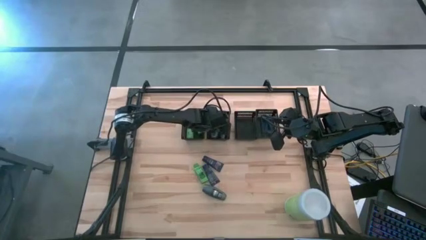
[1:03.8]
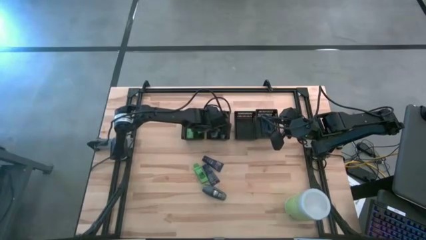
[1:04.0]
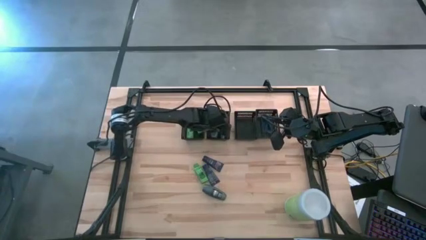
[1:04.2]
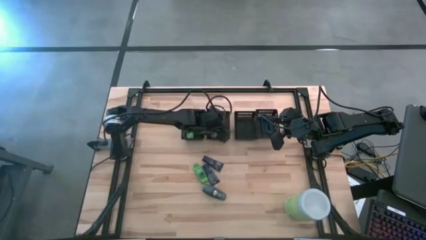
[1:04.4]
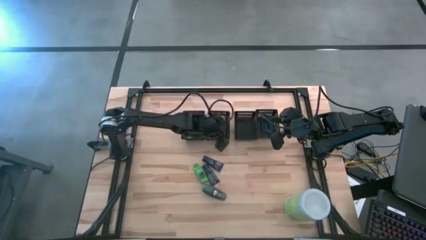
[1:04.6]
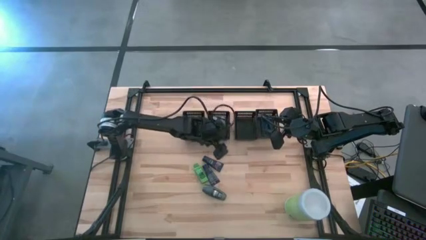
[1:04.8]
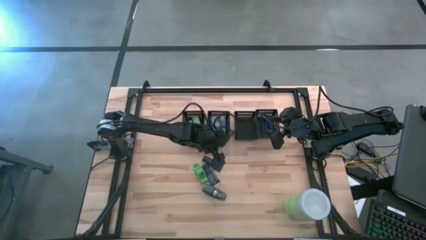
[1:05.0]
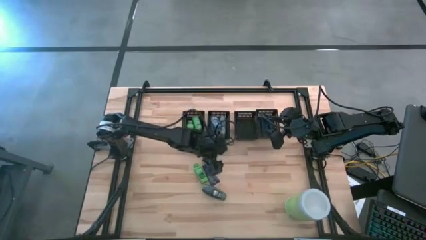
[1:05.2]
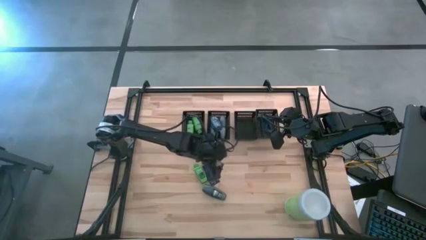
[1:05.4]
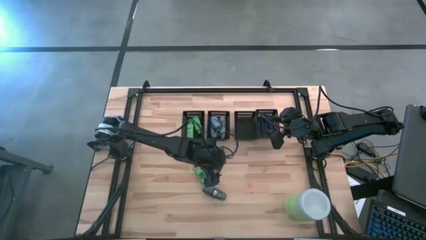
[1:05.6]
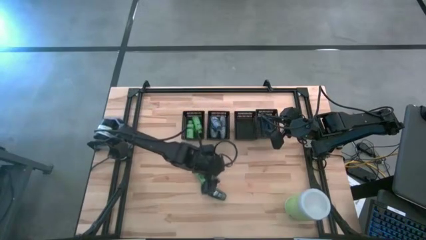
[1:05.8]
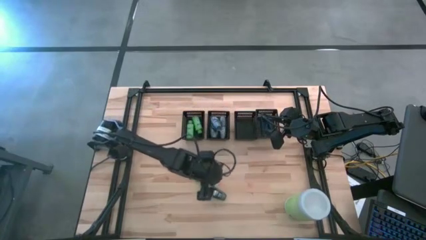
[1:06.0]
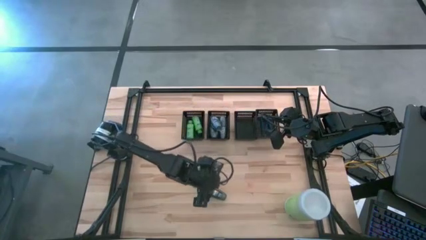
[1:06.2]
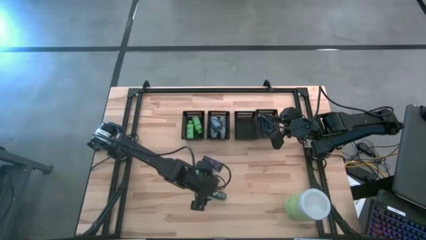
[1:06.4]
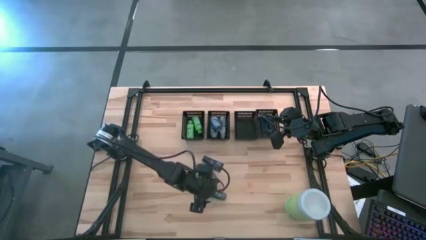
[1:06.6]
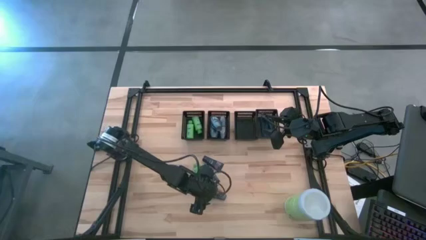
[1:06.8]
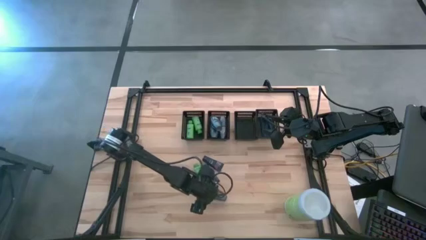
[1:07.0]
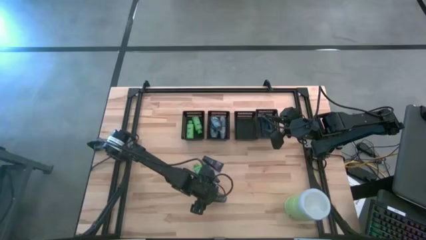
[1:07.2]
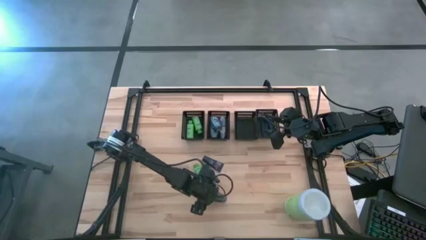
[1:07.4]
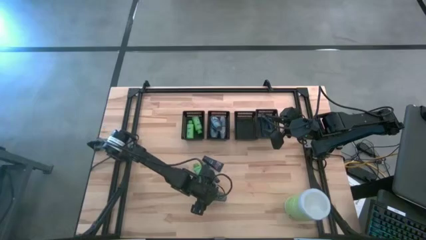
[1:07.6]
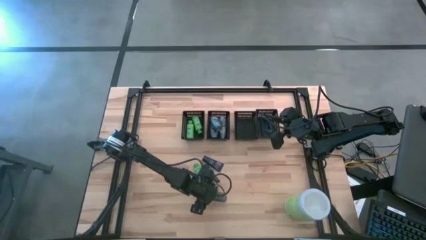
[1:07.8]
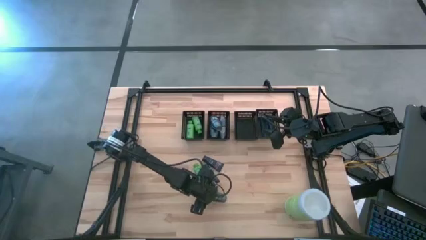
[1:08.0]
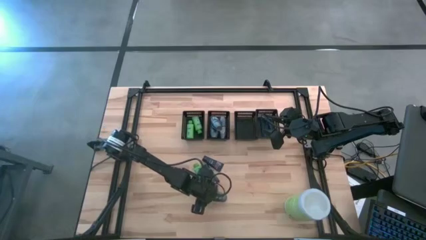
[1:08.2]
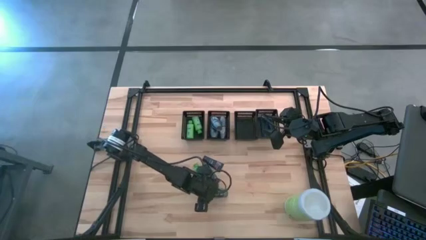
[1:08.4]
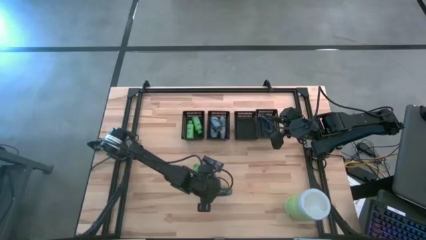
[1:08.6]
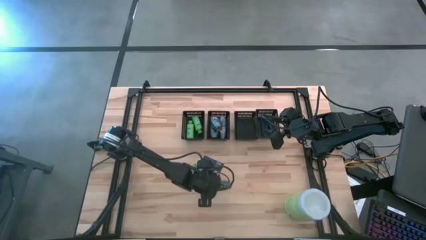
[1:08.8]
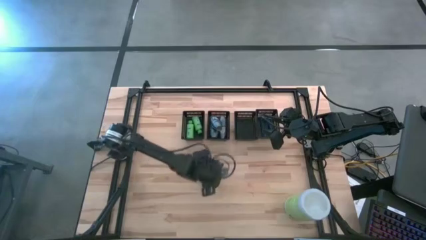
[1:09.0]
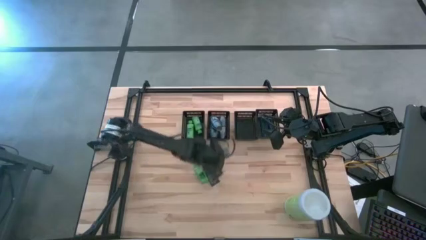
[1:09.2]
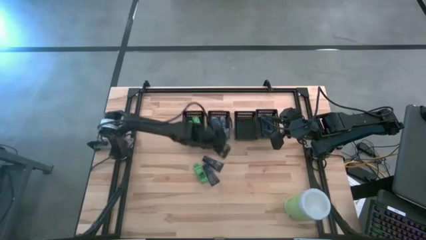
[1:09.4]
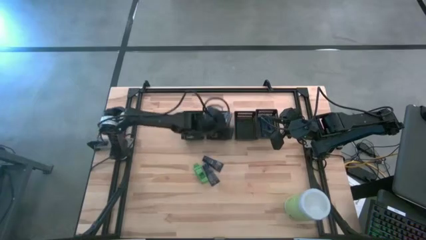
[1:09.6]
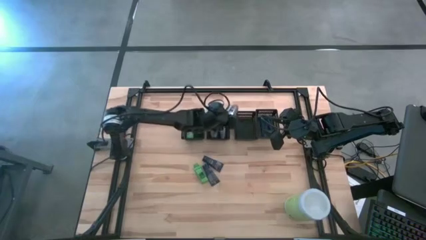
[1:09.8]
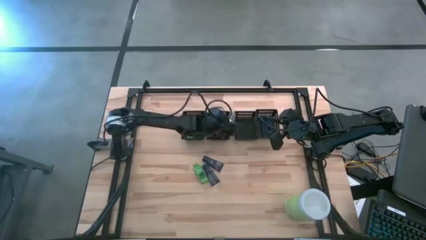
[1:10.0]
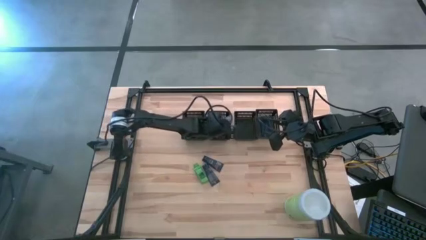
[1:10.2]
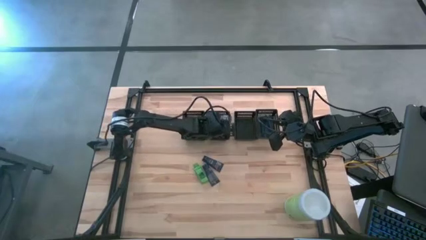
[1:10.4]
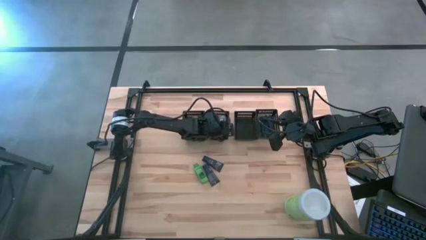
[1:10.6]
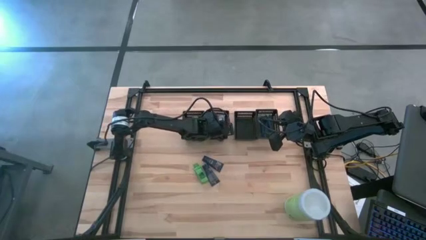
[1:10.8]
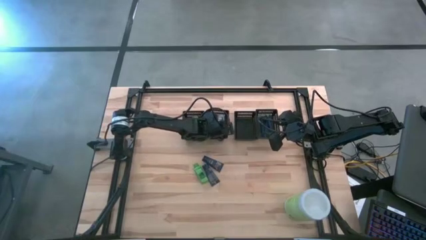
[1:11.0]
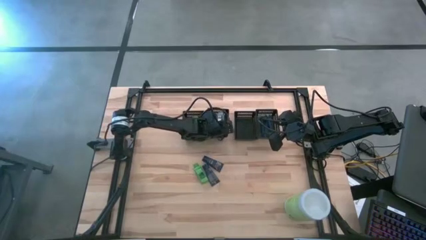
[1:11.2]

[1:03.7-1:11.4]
Task: Pick & Place Travel size toiletries
Put the roll-on into the center left black basket

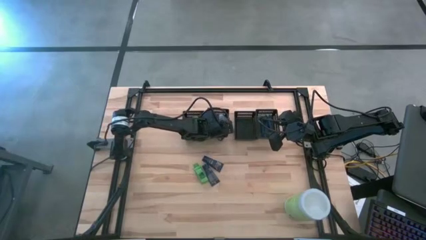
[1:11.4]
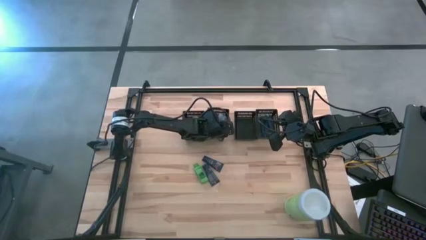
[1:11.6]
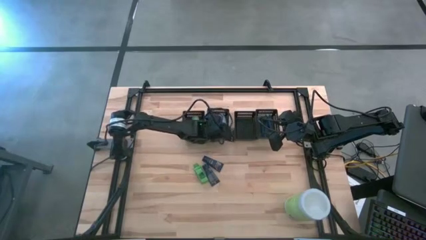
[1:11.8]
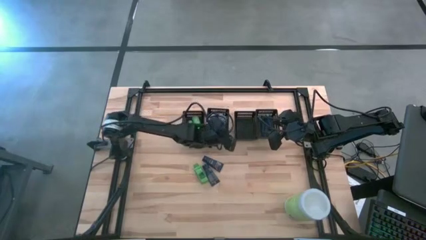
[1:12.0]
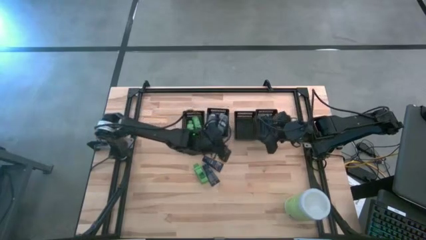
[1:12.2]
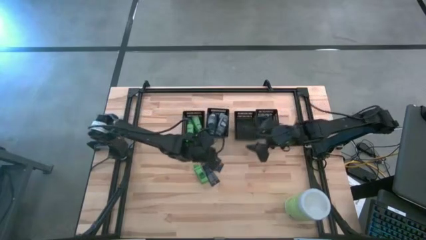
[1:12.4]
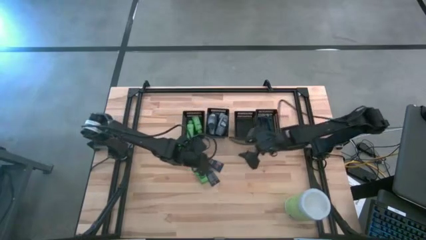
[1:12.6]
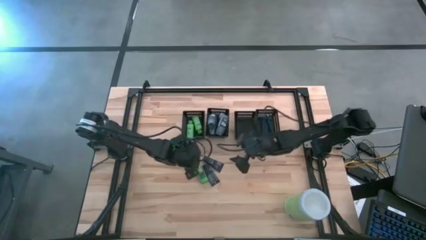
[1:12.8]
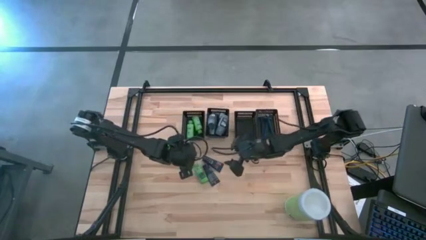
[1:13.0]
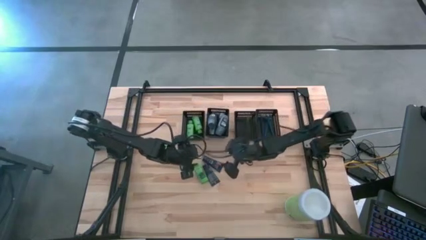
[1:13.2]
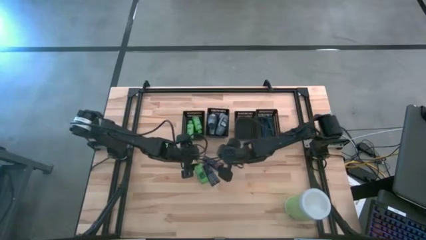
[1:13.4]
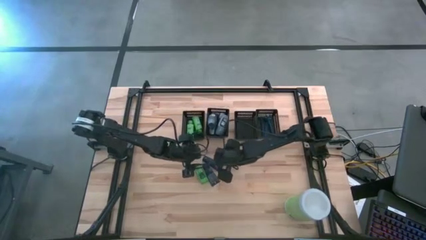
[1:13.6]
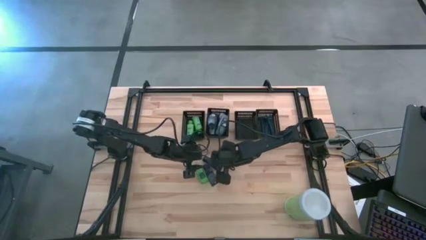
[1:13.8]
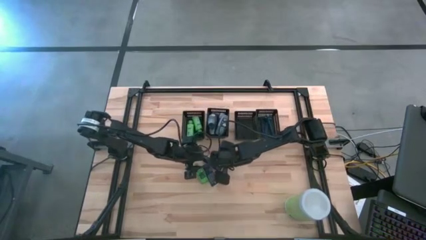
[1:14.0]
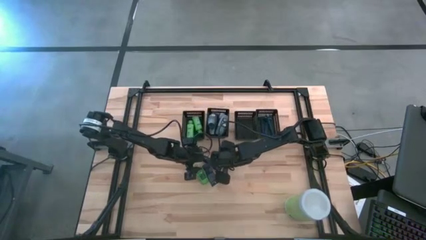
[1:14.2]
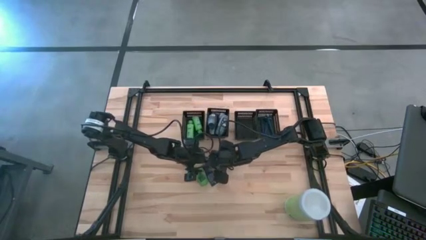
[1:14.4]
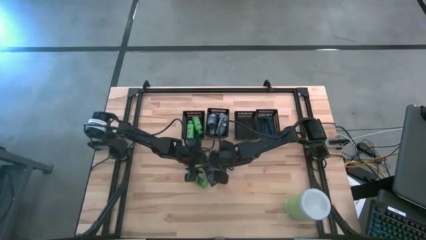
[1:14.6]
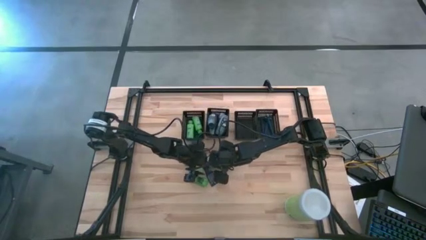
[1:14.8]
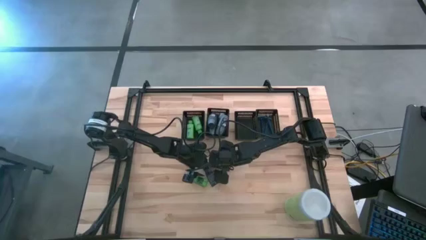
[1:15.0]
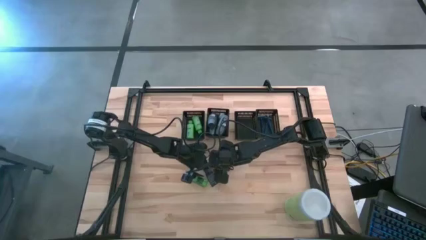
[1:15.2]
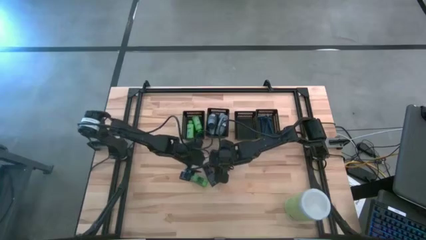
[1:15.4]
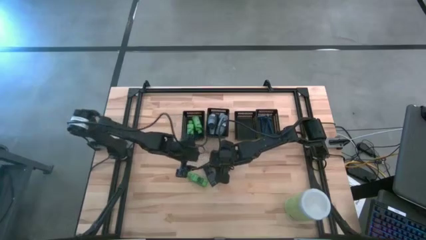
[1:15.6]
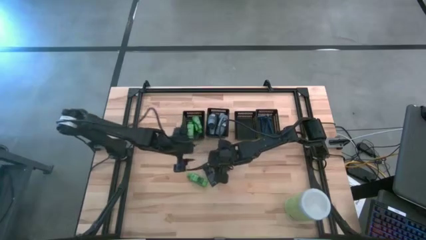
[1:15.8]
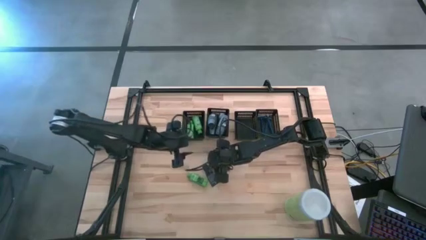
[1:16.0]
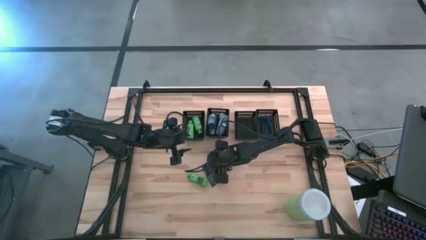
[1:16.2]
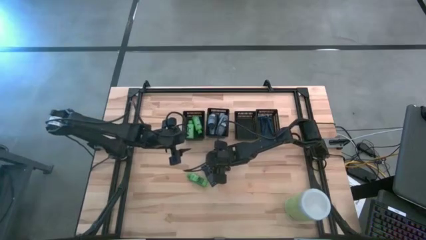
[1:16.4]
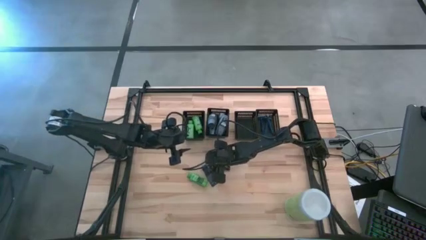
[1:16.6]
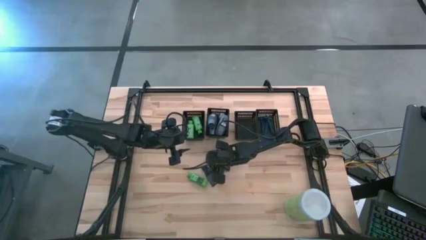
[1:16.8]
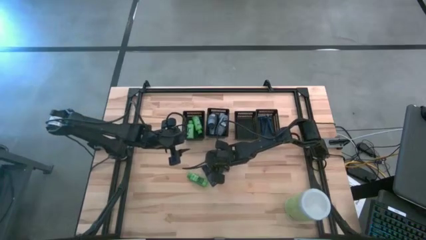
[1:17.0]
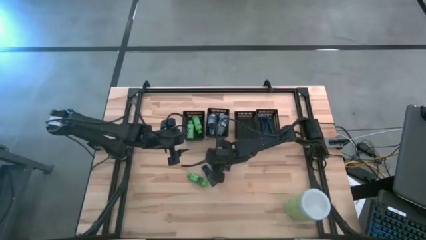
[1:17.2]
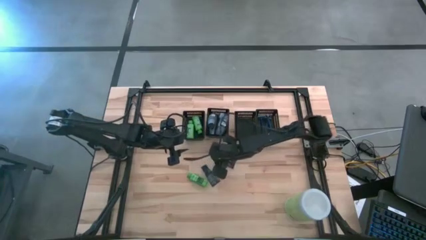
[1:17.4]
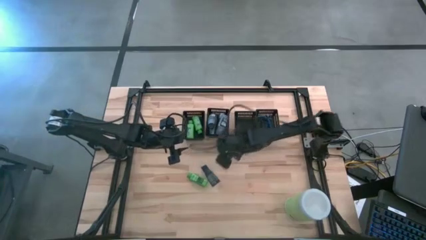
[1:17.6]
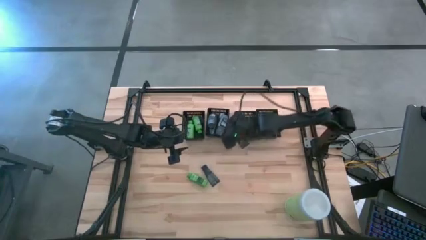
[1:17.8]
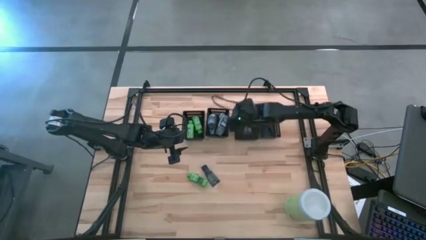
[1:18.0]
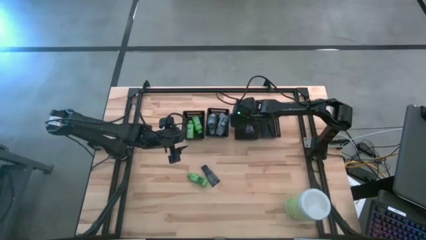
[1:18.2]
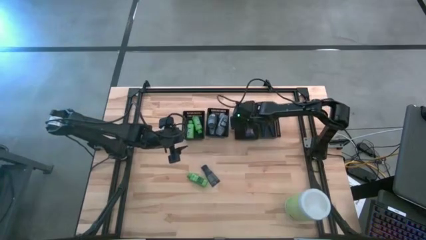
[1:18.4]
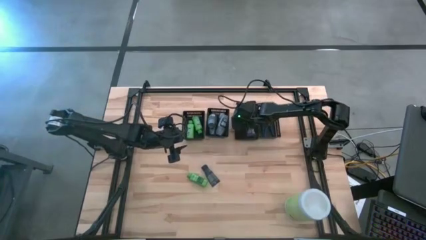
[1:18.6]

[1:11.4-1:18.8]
Put the shave cream into the center right black basket

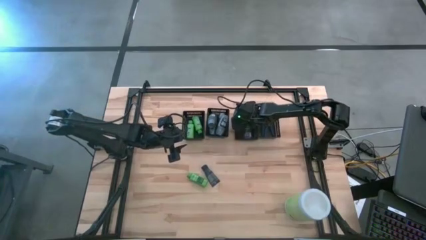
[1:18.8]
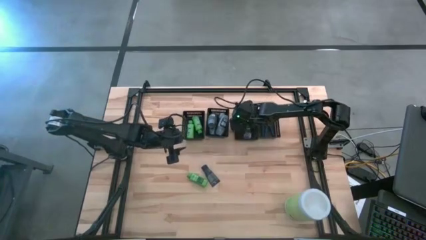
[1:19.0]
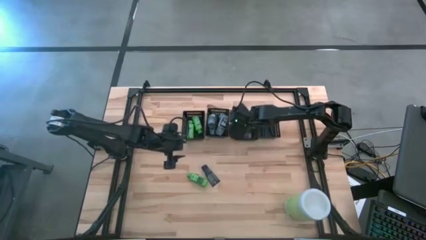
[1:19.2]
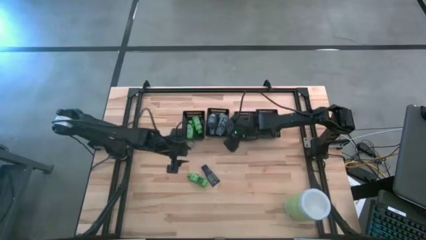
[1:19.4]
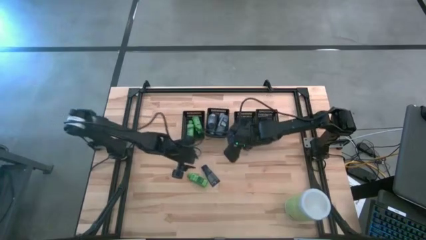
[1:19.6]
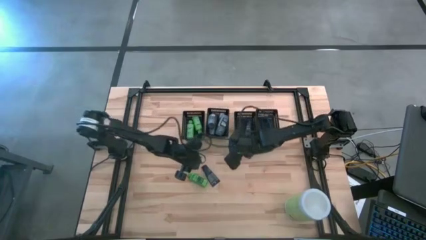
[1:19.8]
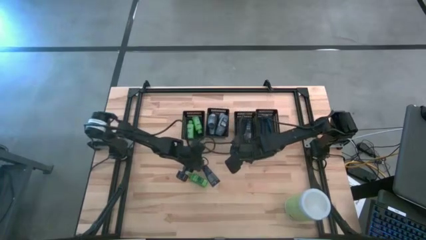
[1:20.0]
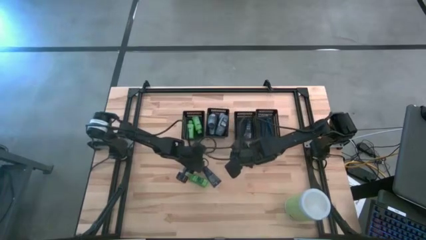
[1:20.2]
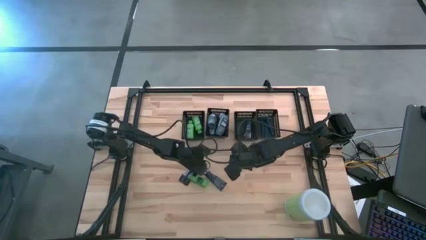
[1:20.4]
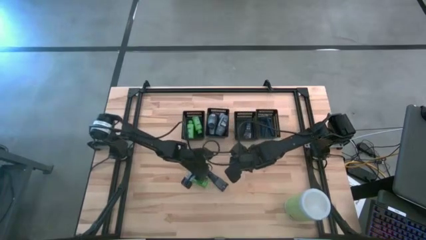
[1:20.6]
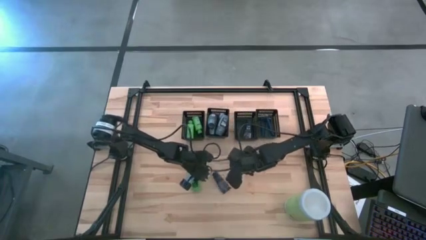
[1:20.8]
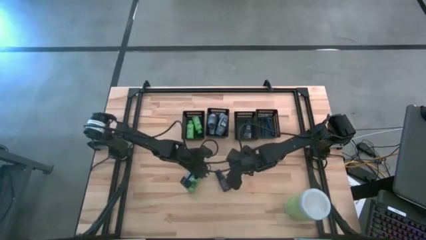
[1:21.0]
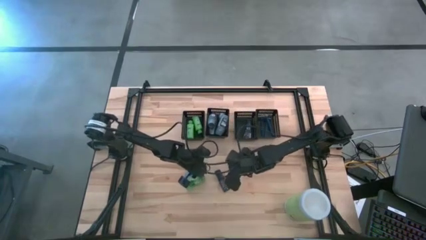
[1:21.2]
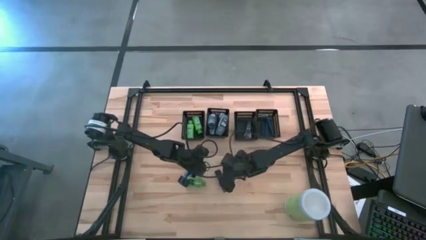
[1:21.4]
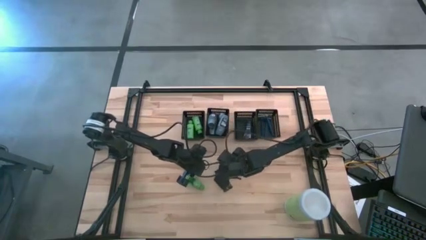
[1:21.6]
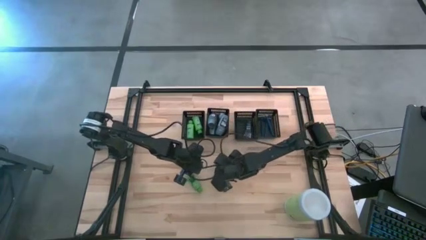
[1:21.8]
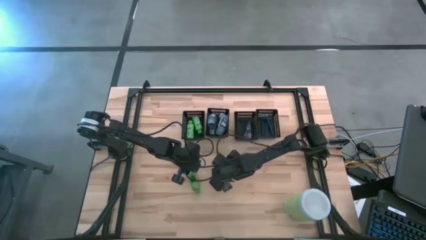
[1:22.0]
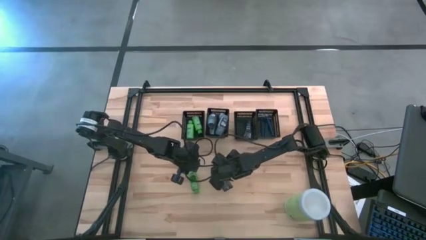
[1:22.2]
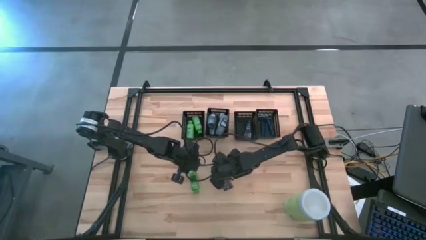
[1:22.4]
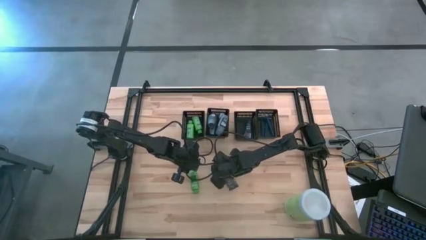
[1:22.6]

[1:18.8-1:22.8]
Put the shave cream into the center right black basket
